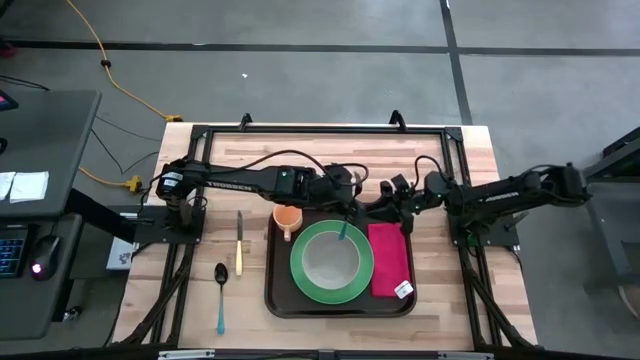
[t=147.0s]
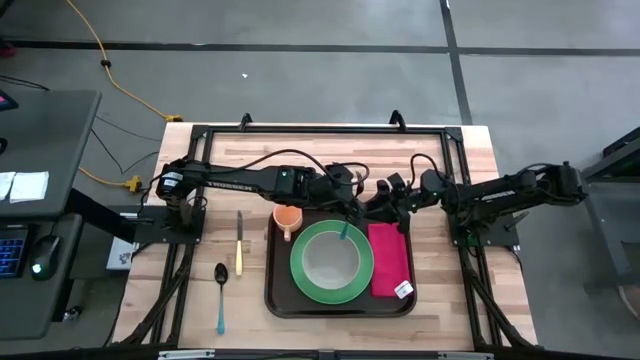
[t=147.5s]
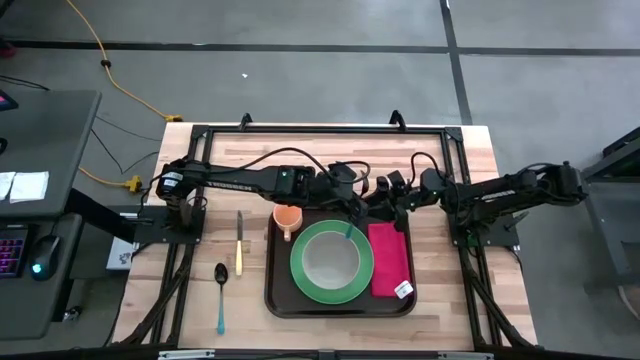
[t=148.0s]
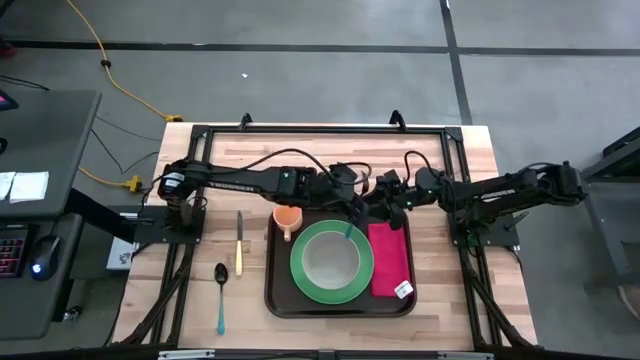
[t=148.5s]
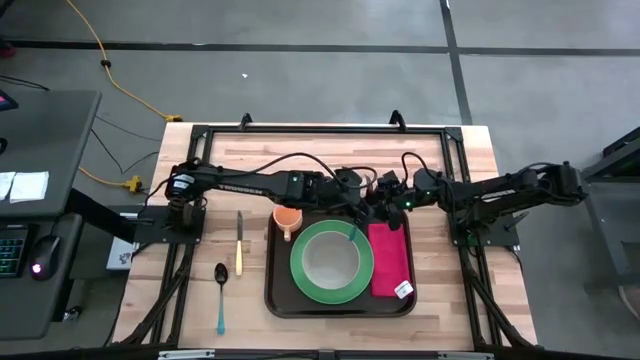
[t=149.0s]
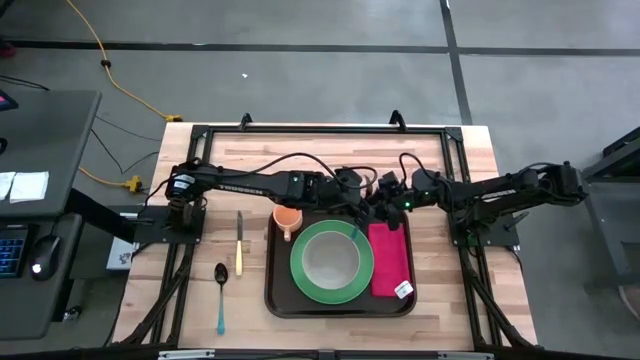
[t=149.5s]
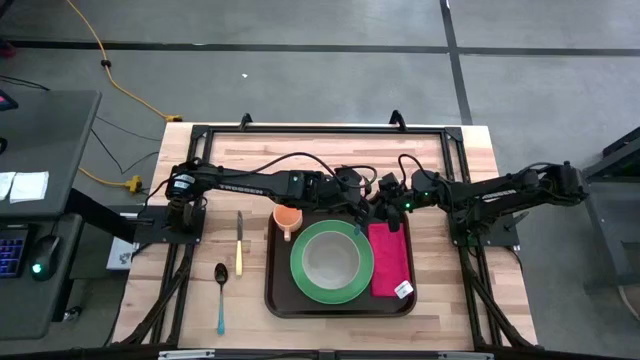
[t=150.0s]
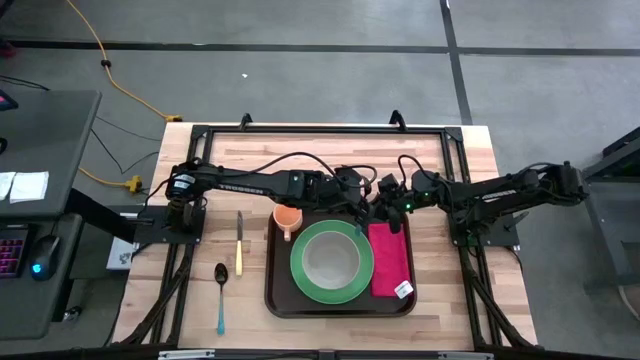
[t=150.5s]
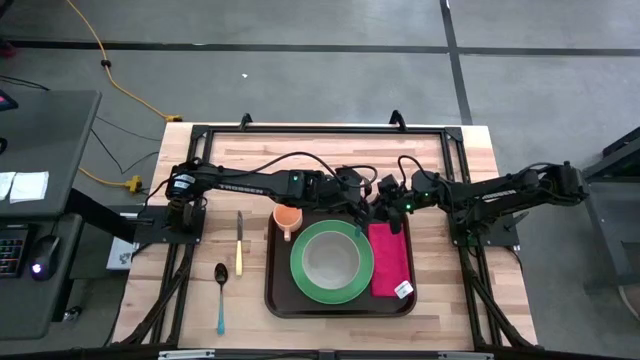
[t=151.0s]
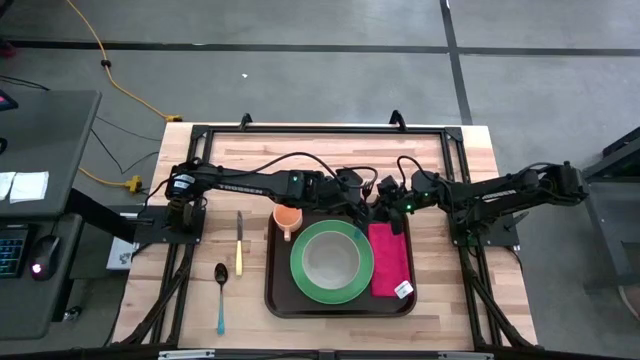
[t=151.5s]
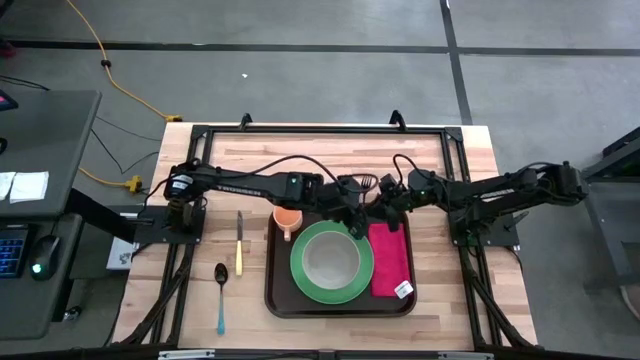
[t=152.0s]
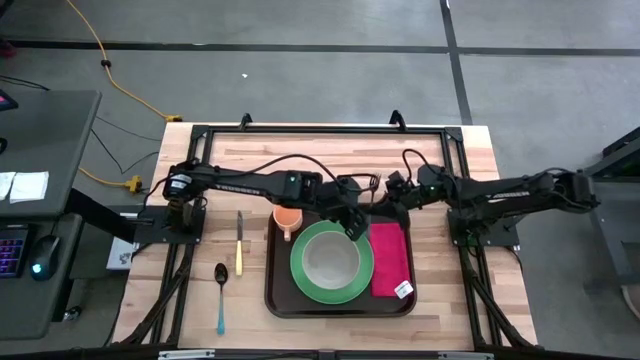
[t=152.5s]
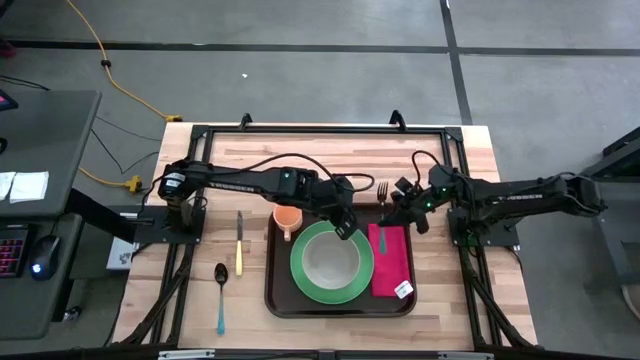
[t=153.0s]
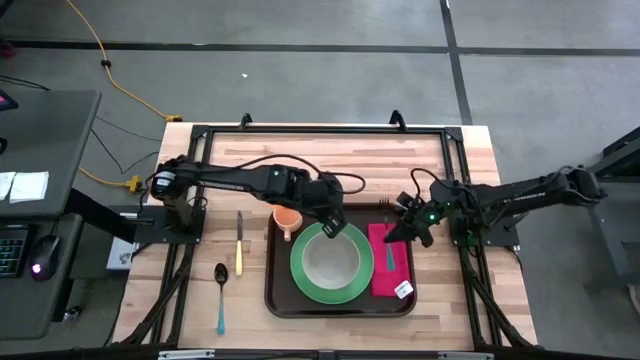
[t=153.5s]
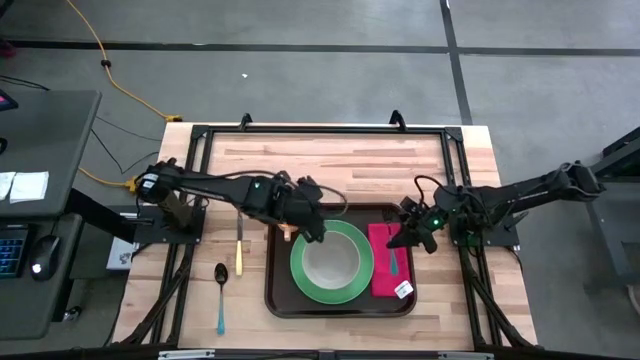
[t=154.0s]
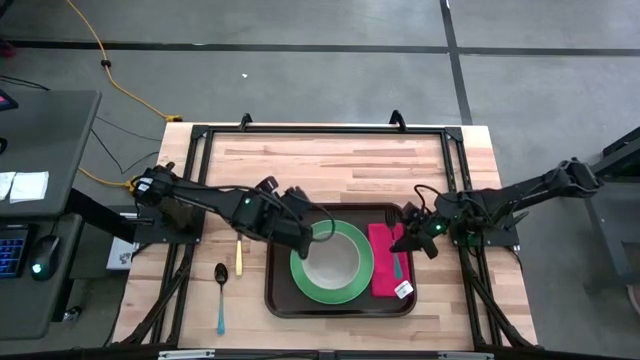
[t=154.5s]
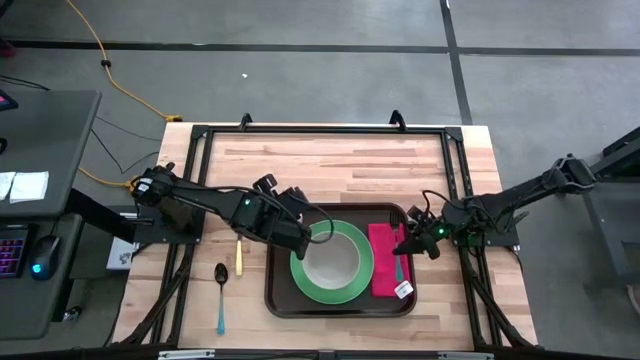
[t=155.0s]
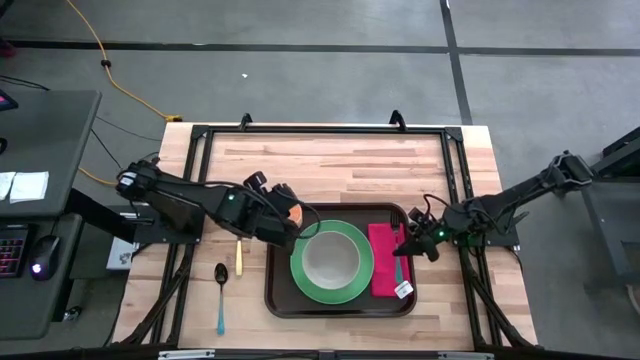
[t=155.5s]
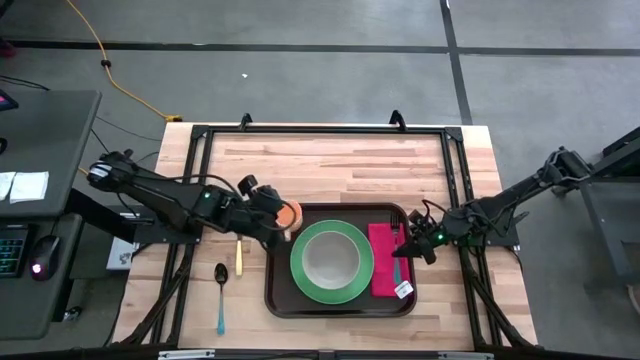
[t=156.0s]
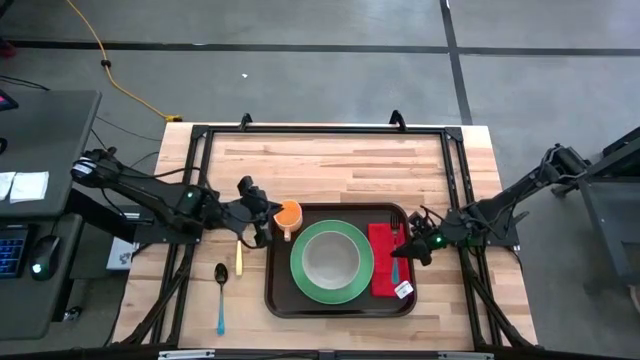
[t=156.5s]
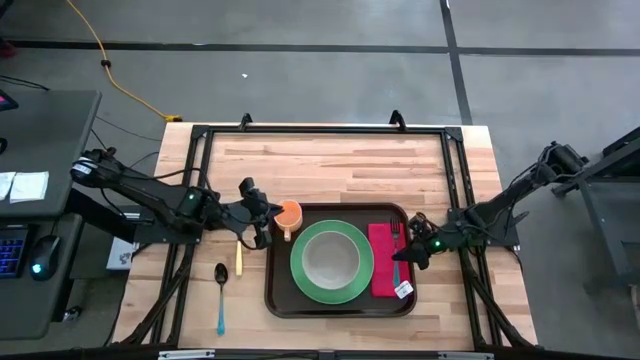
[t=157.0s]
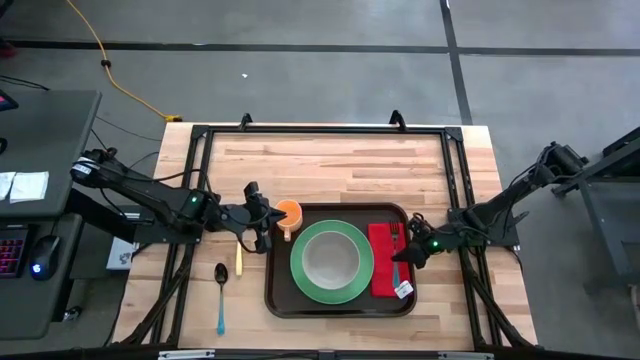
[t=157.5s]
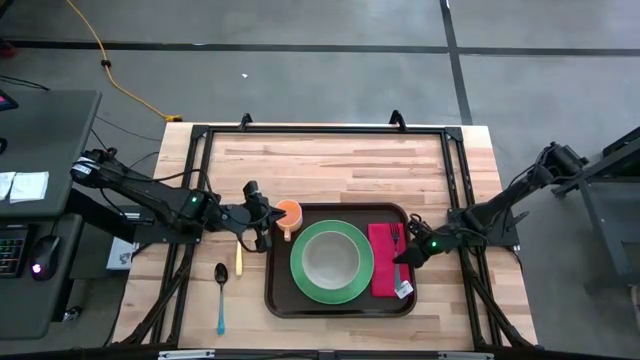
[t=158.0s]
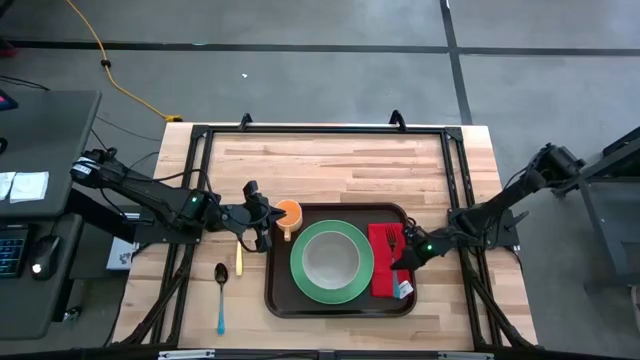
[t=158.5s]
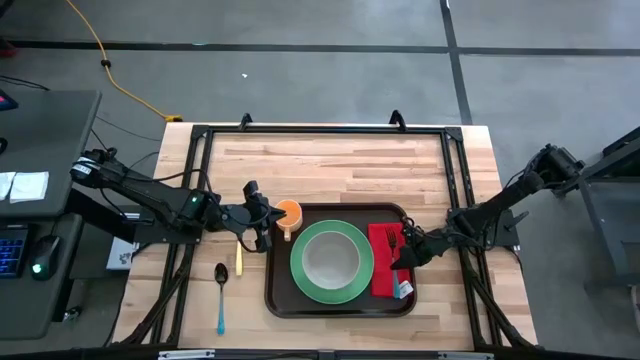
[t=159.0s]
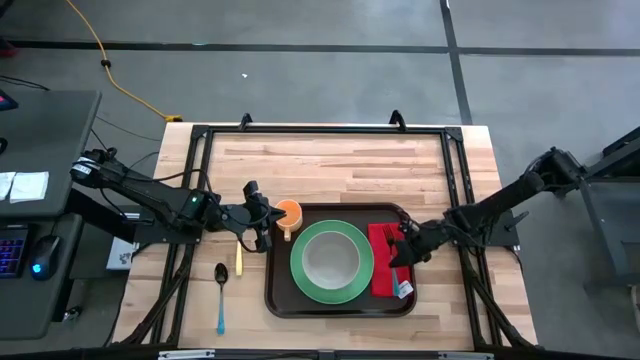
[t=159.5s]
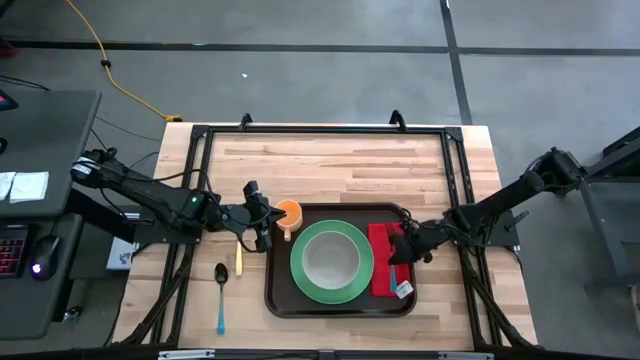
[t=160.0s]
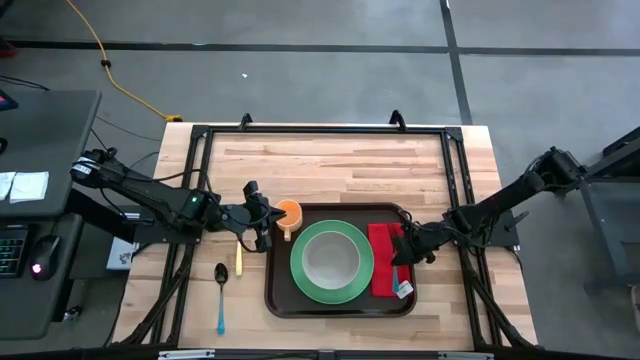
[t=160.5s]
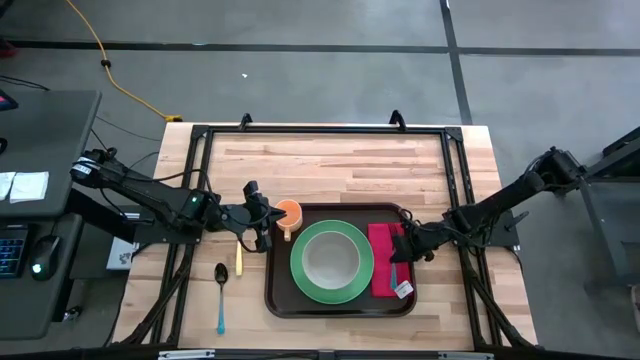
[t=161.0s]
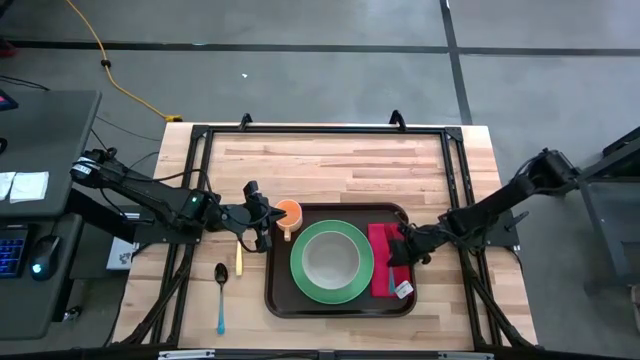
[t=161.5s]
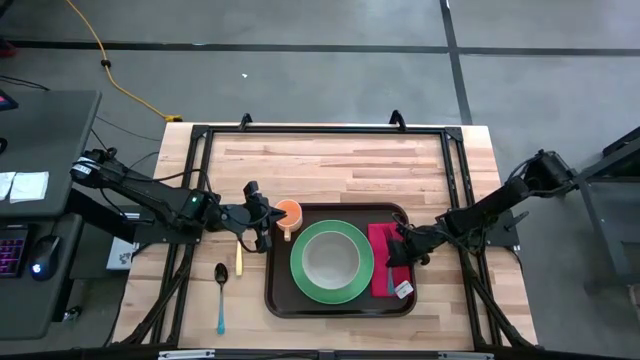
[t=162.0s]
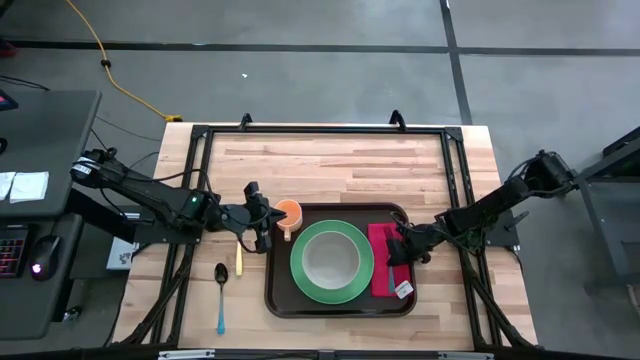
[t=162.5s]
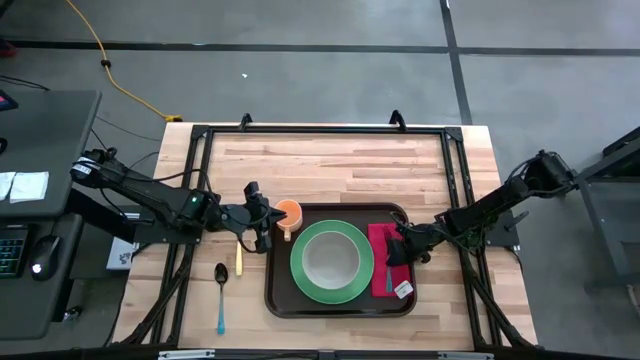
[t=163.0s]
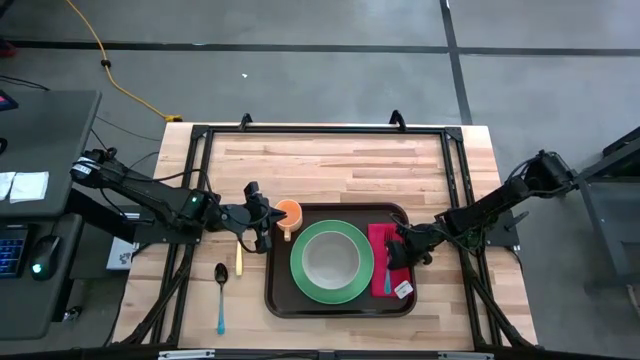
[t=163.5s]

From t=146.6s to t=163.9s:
Task: Set up tray
Put the blue fork on top of the red napkin

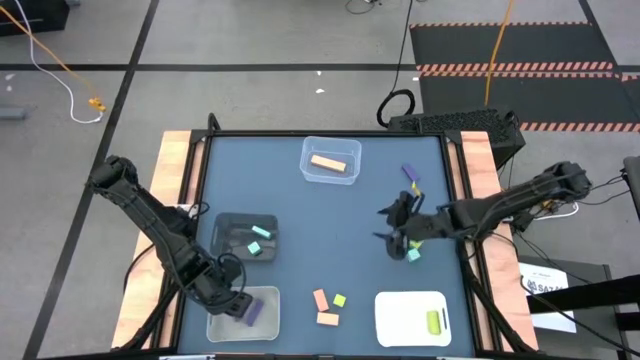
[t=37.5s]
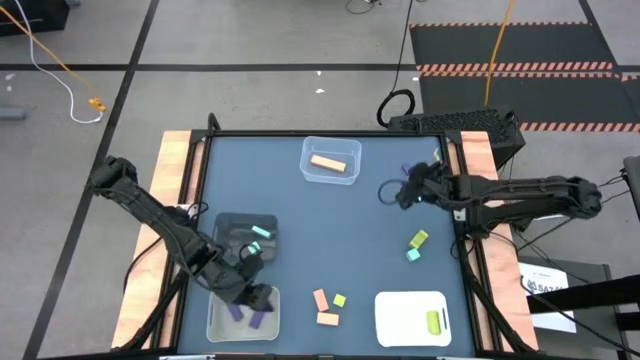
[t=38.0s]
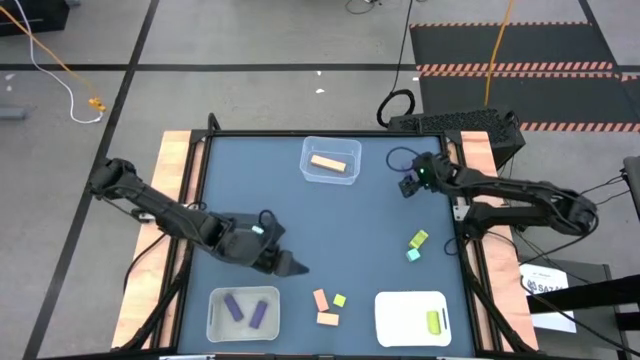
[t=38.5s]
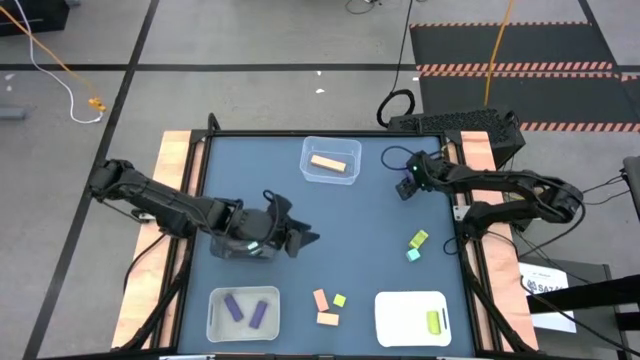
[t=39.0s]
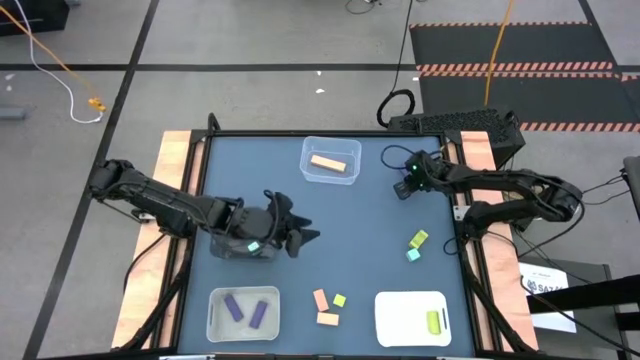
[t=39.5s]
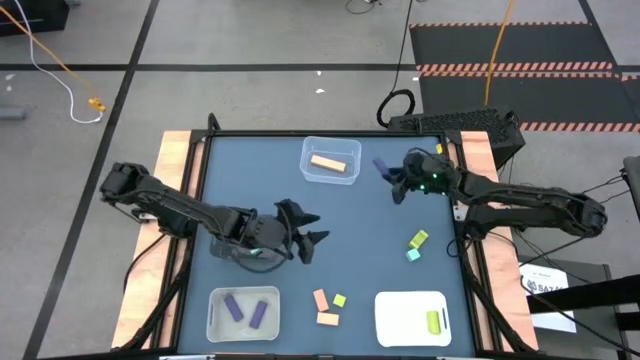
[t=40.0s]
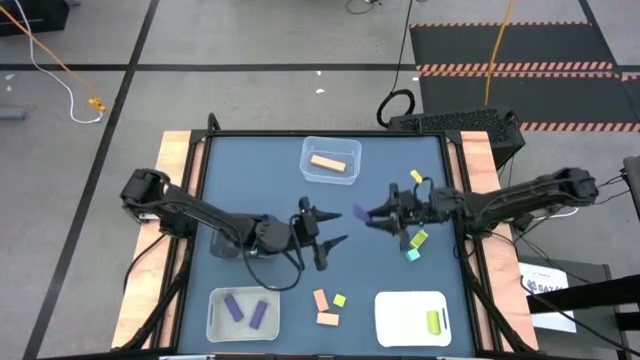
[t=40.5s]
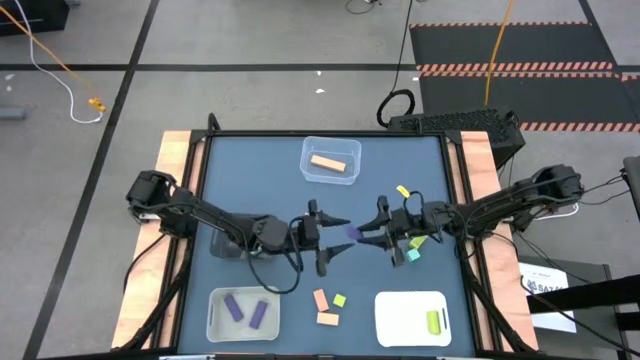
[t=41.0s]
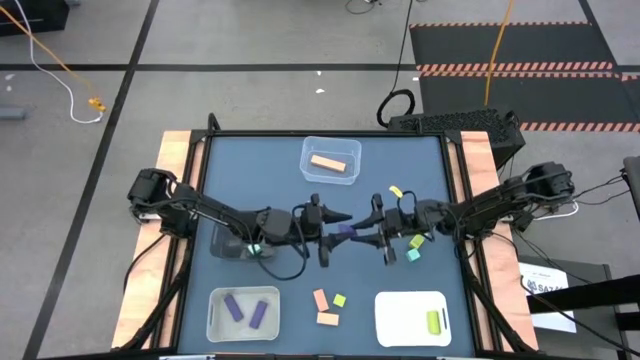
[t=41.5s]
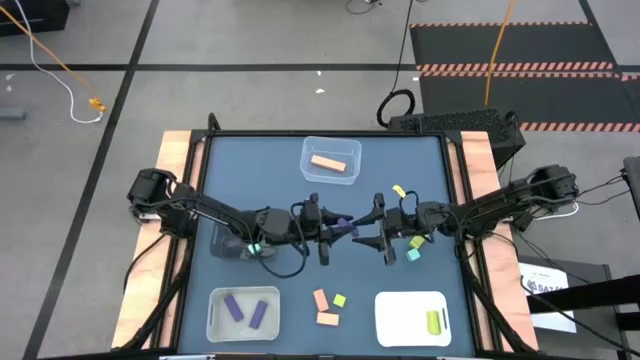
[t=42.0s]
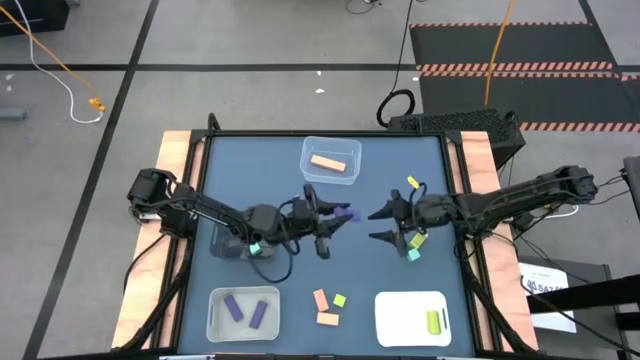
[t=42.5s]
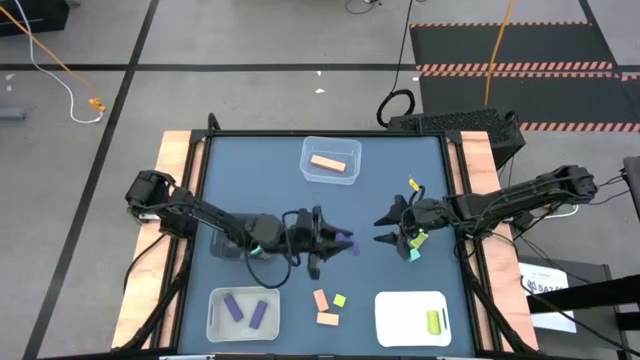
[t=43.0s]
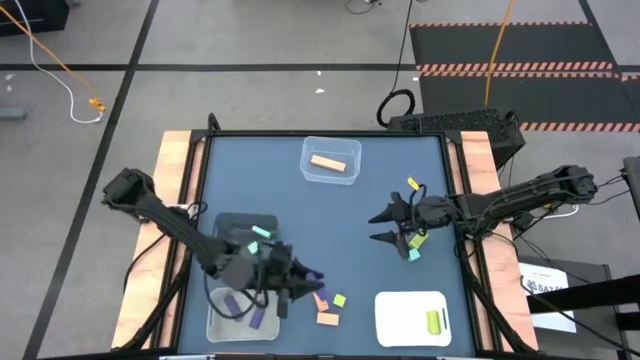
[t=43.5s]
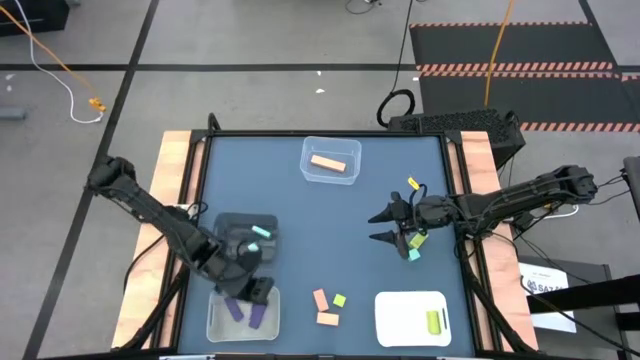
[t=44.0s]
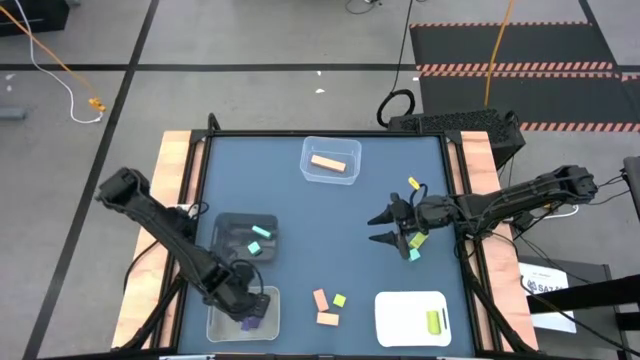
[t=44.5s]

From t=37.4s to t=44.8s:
Task: Sort & place blocks by color
Put the purple blocks into the gray bin
